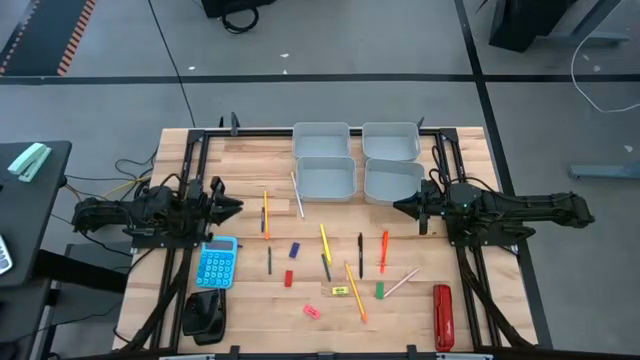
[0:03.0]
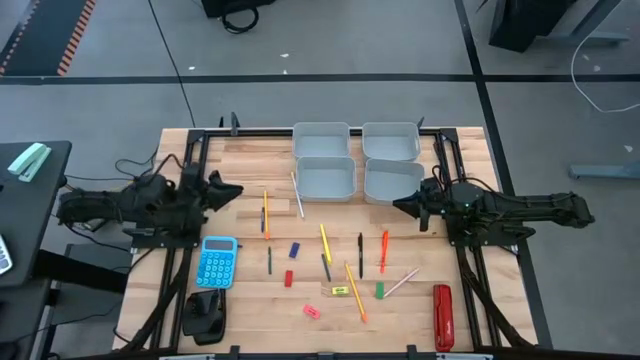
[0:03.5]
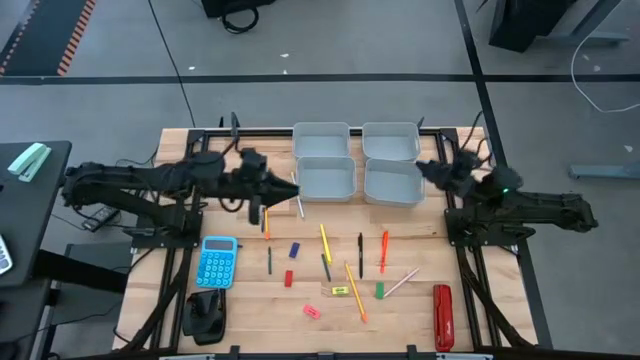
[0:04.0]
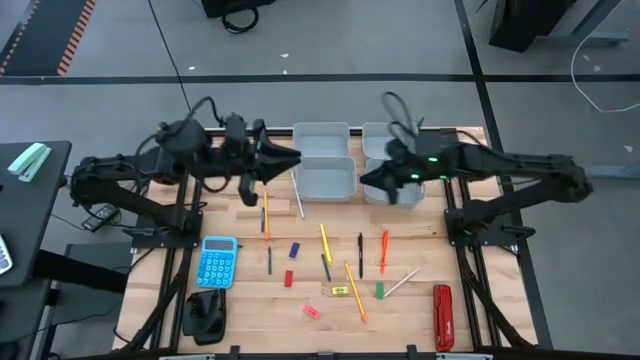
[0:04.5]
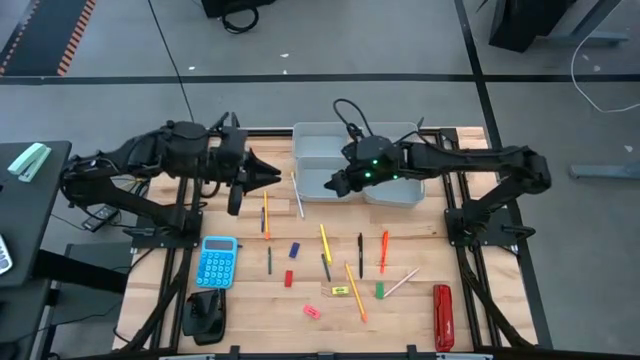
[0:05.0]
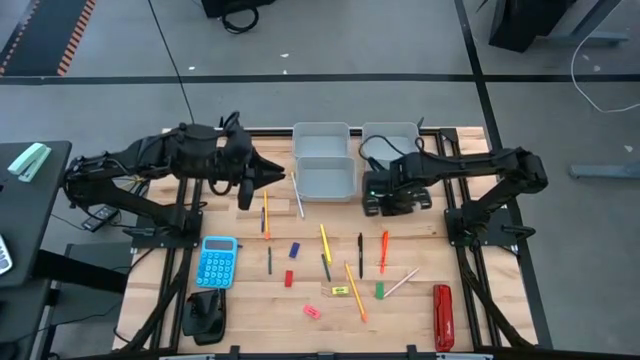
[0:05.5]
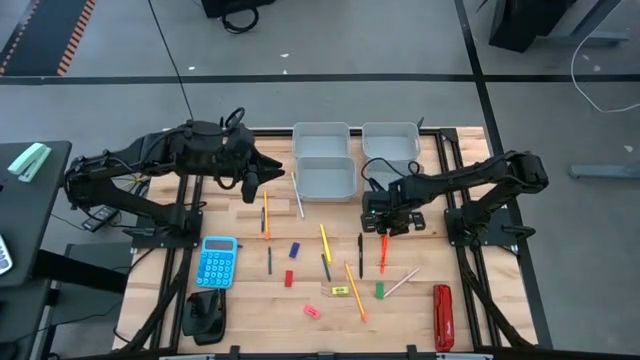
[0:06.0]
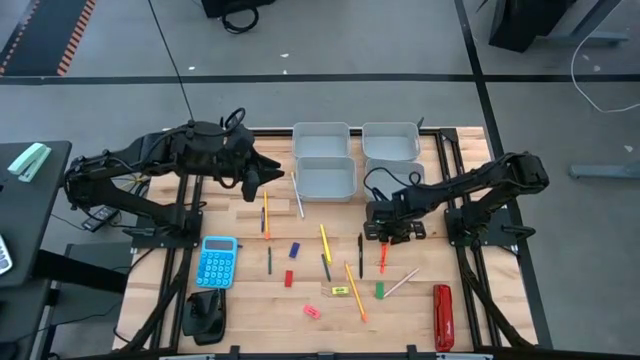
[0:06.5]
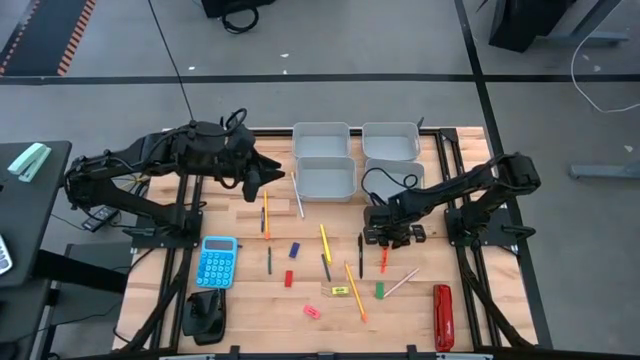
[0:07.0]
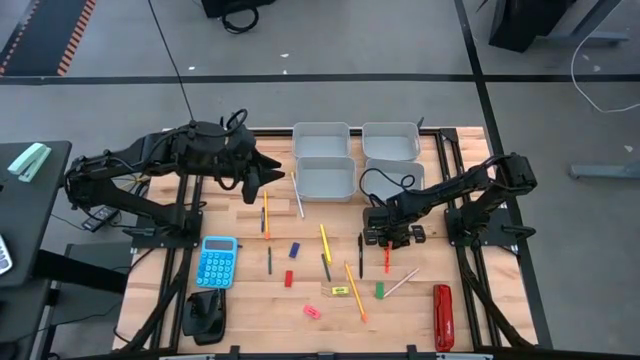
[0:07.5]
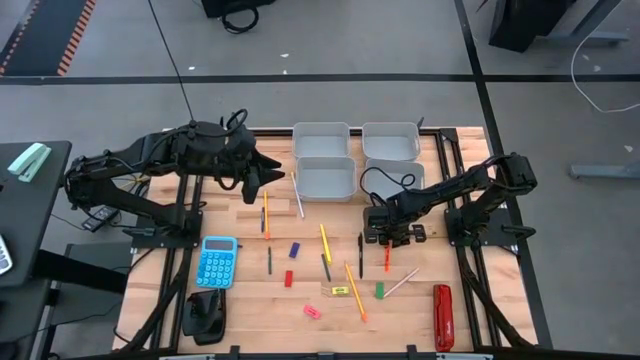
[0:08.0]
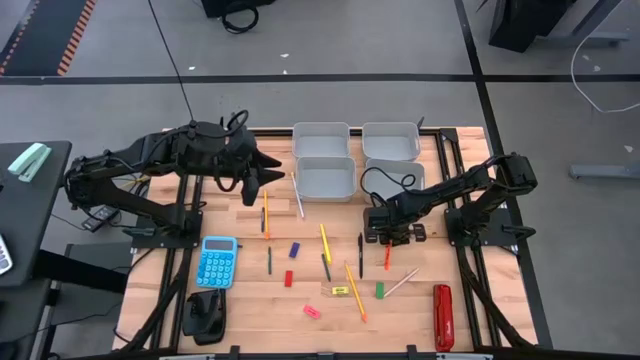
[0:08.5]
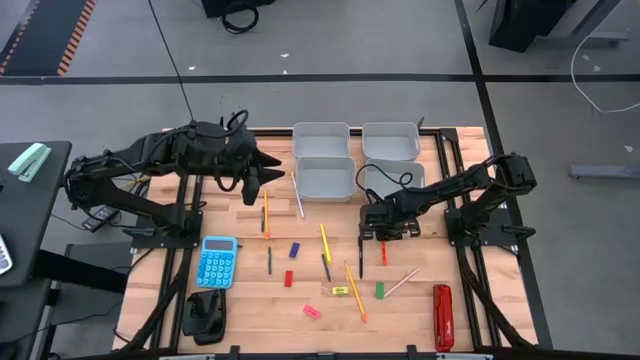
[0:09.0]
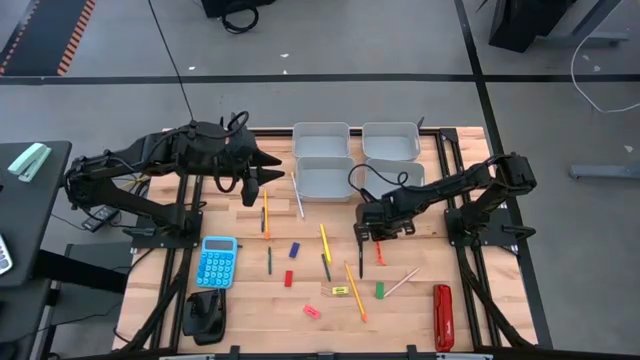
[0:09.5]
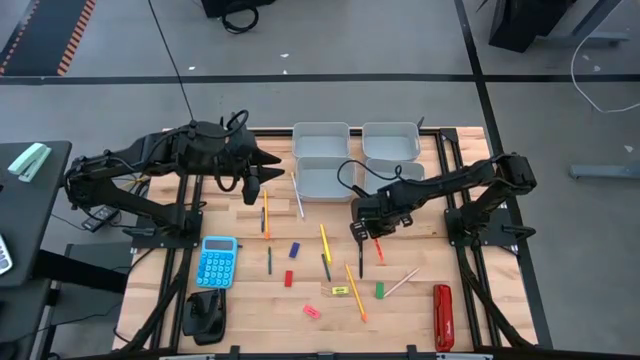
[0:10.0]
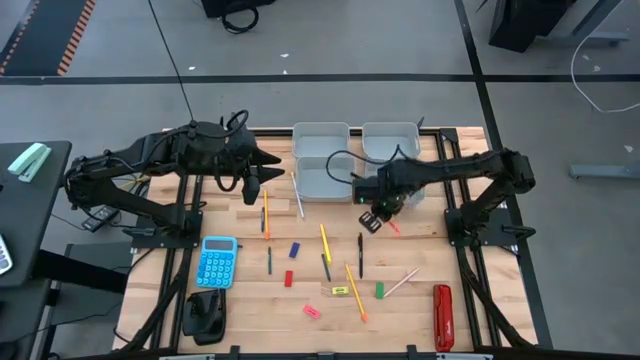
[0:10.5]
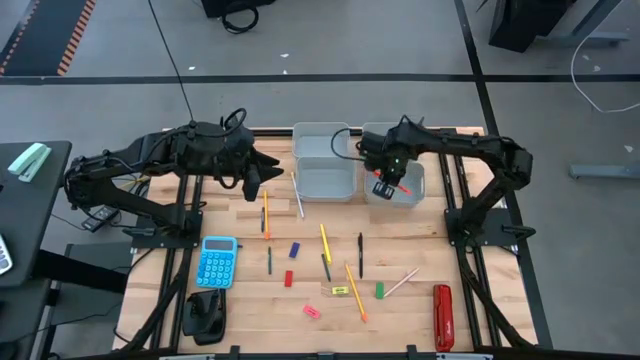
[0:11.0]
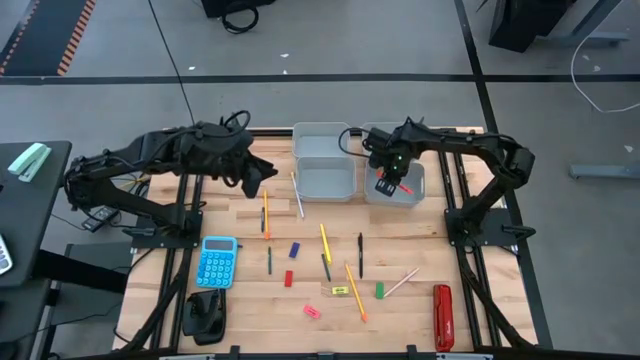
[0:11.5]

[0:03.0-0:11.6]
Task: Sort crayons/erasers/pens/pencils in bins
Put the orange pen into the bottom right gray bin

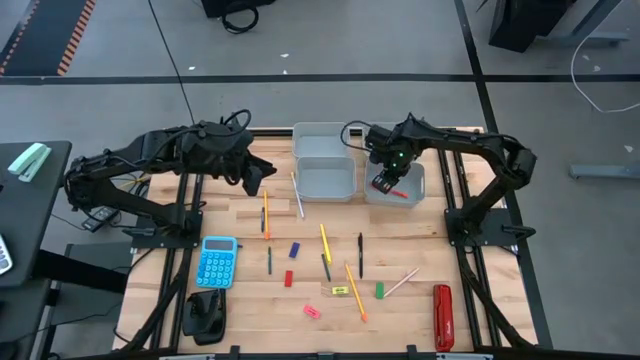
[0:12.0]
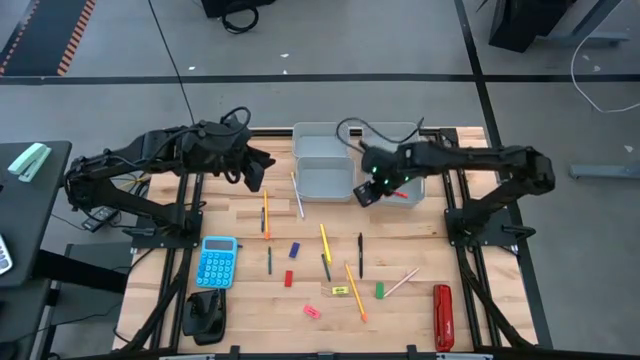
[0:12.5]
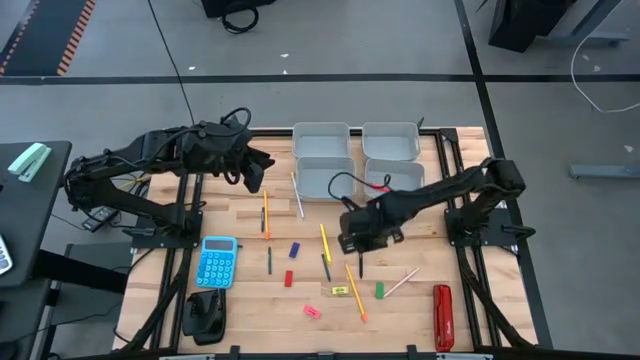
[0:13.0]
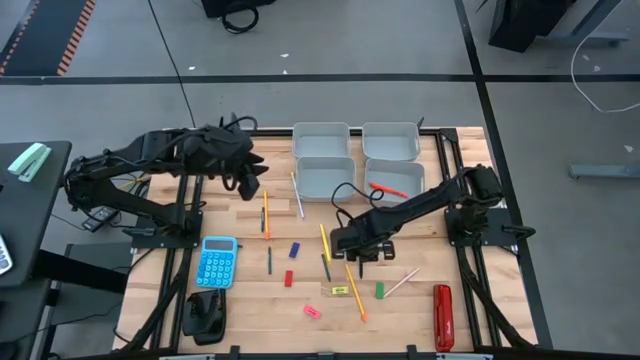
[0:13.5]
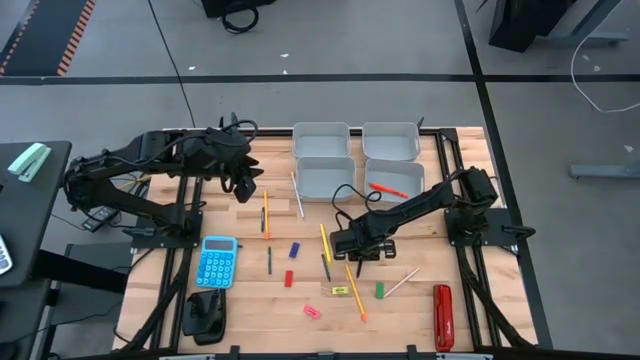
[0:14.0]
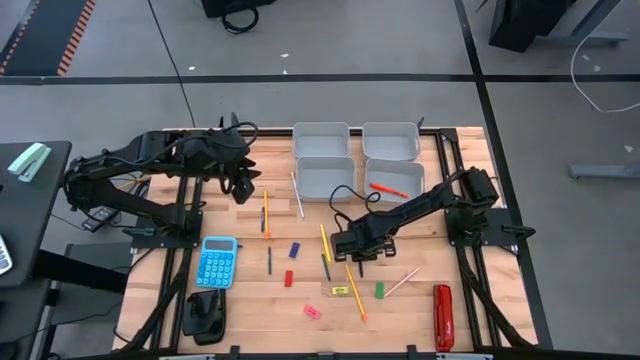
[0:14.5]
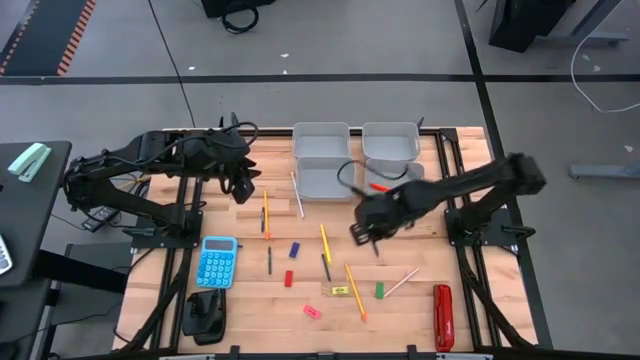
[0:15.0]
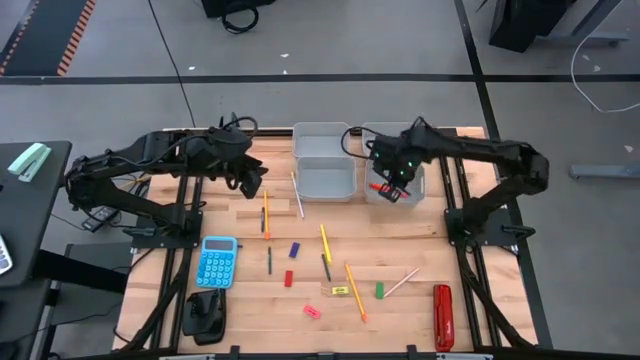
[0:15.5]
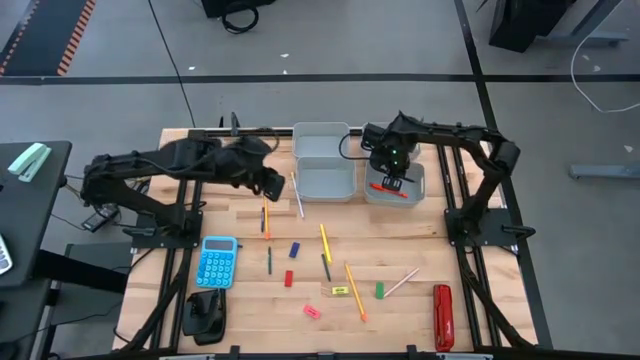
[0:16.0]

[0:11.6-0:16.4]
Put the black pen into the bottom right gray bin

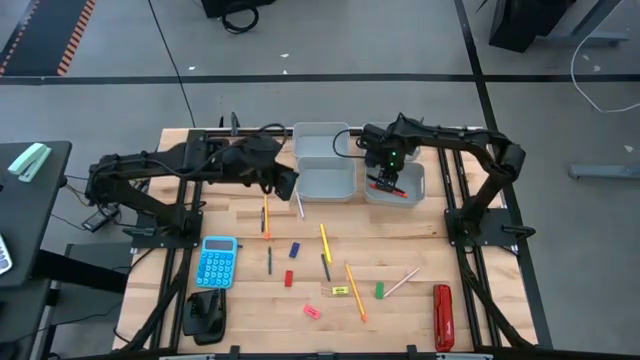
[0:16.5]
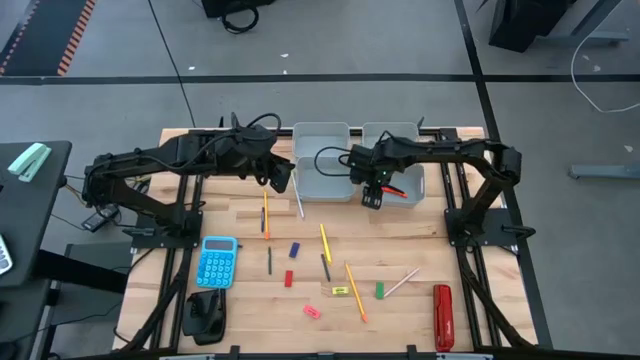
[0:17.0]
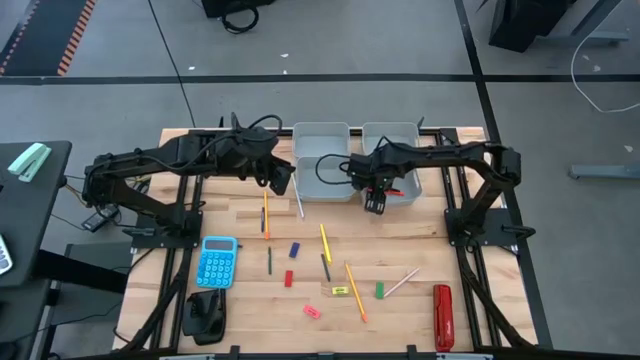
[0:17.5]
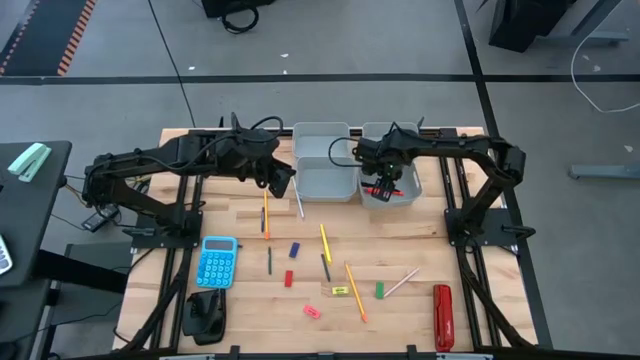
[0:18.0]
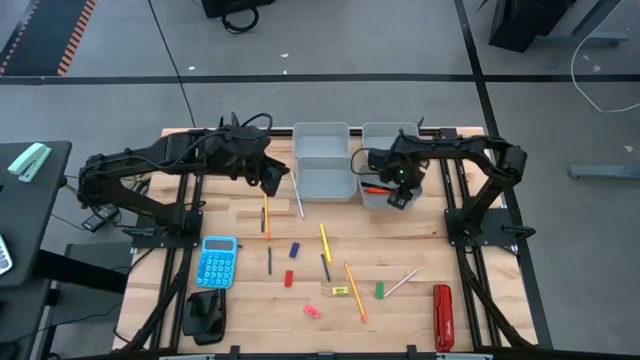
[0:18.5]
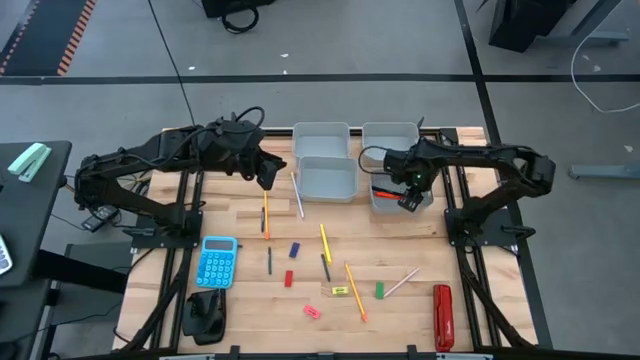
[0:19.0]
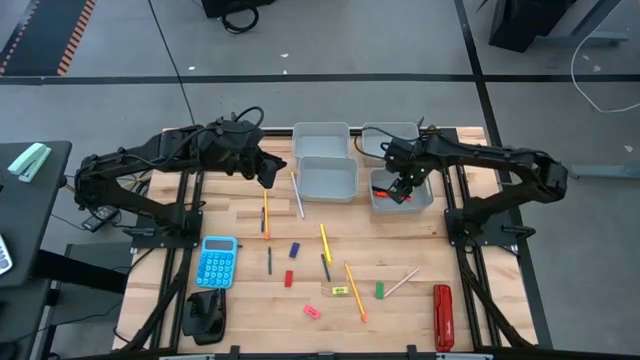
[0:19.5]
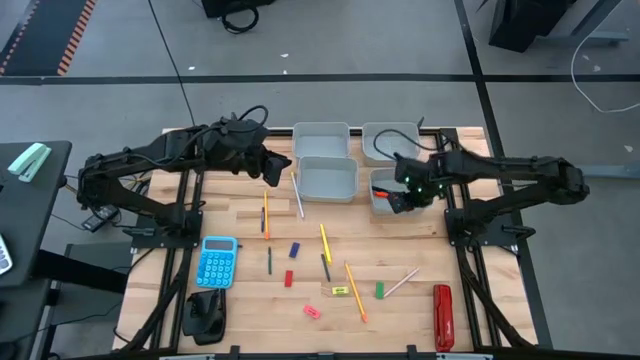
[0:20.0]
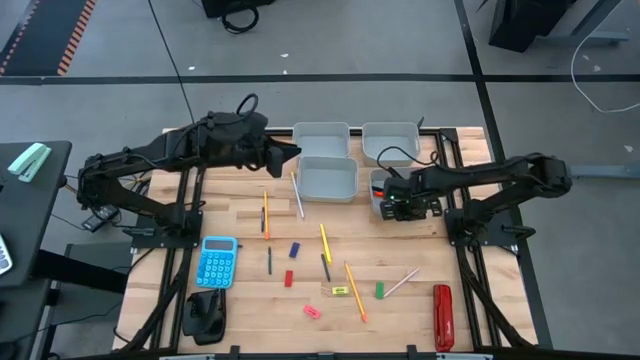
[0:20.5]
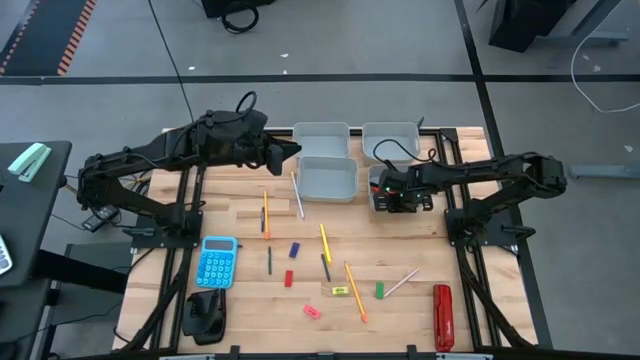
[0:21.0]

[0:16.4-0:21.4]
Adjust the gray bin

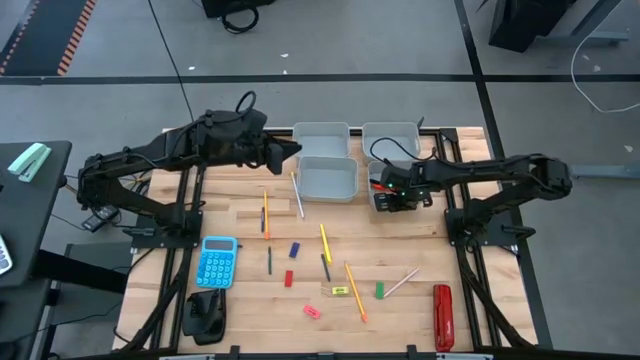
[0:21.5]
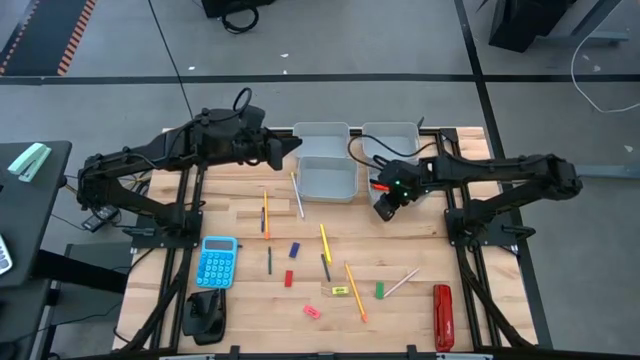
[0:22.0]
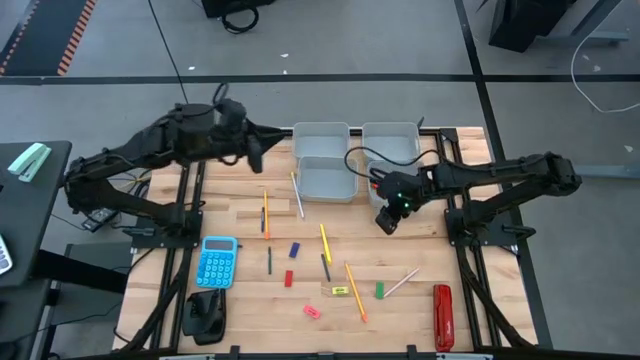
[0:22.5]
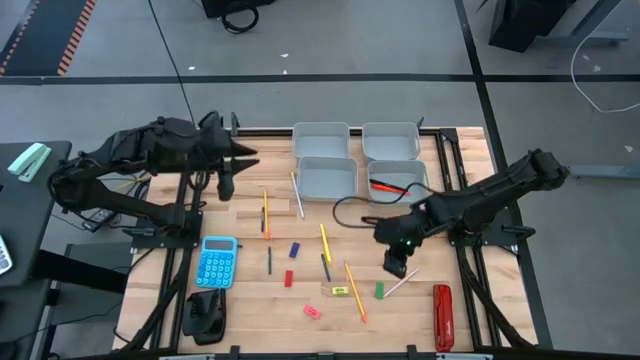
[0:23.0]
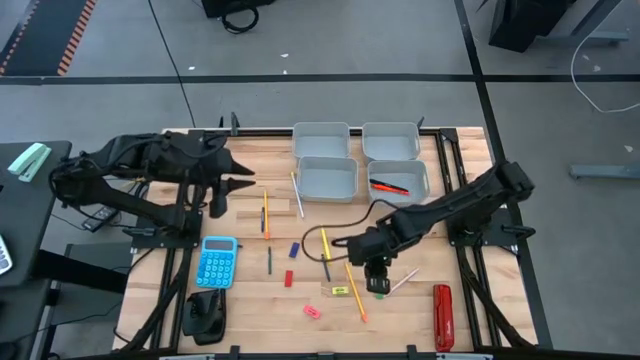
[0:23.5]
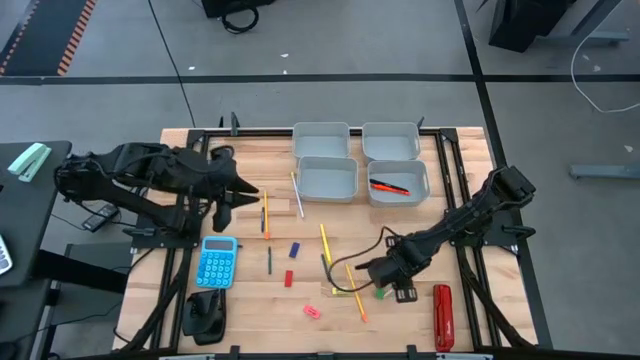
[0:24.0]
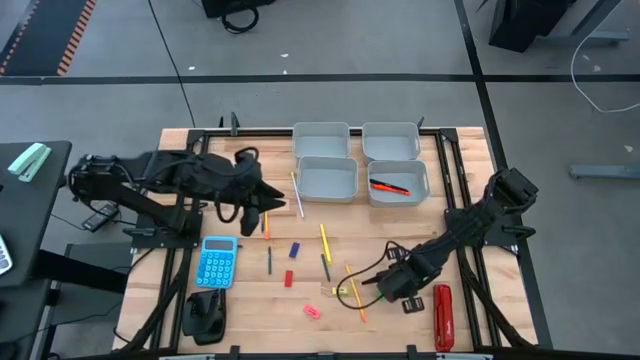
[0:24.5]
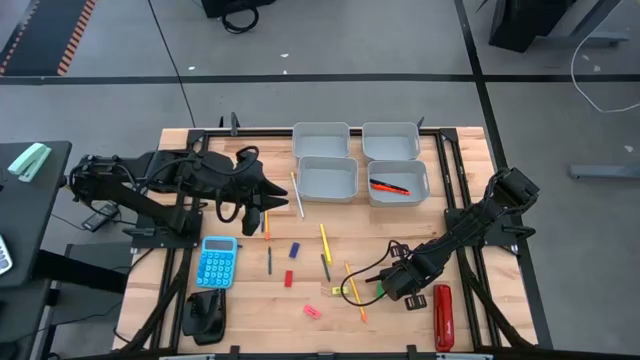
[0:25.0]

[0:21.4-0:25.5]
Put the white pen into the bottom right gray bin
